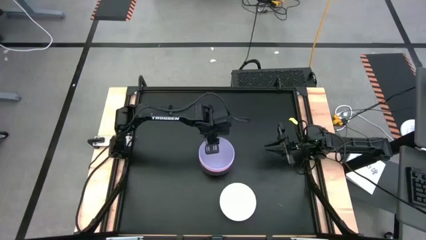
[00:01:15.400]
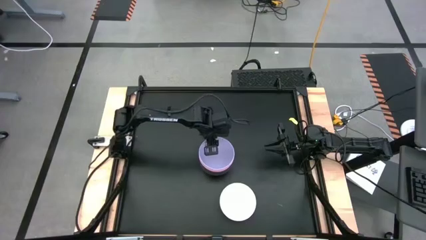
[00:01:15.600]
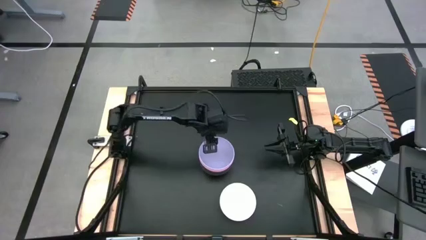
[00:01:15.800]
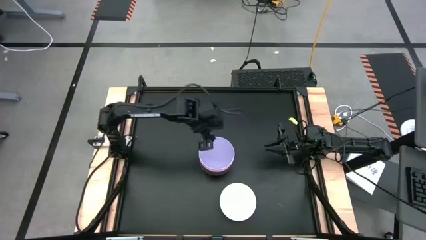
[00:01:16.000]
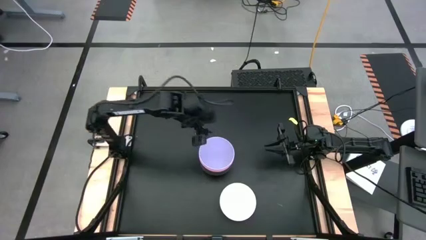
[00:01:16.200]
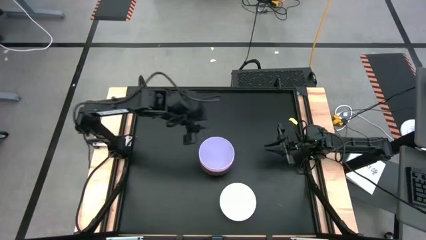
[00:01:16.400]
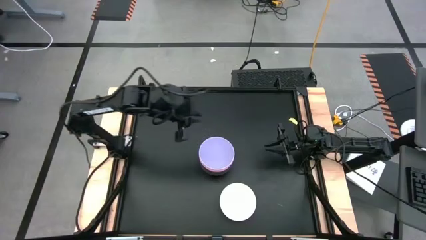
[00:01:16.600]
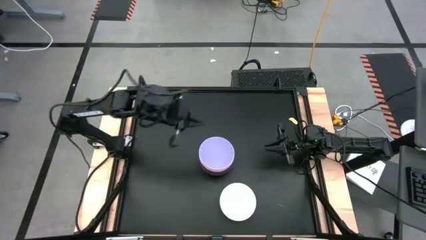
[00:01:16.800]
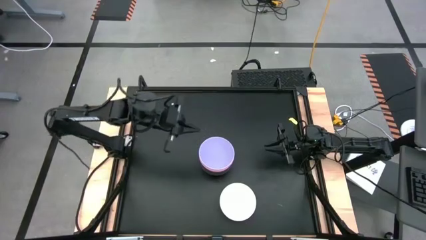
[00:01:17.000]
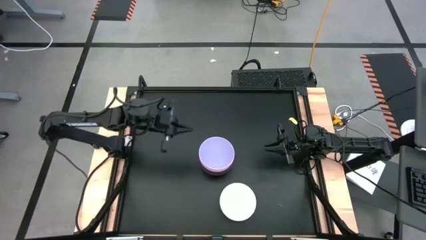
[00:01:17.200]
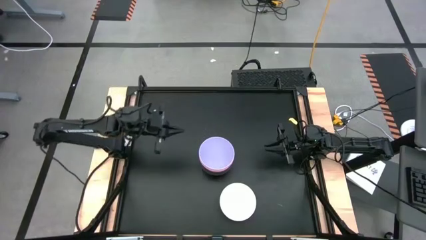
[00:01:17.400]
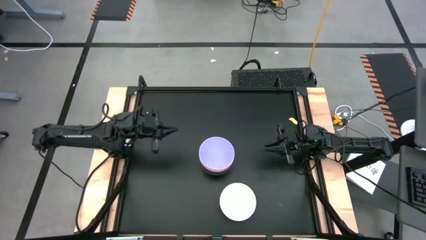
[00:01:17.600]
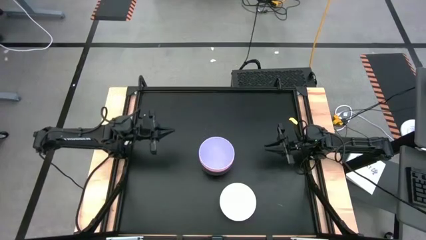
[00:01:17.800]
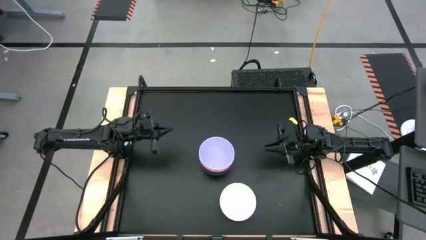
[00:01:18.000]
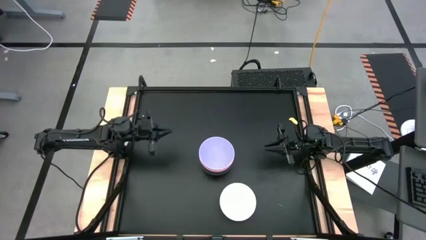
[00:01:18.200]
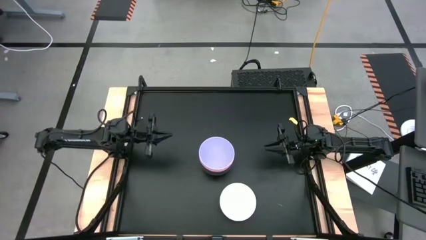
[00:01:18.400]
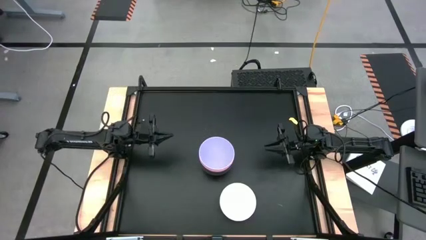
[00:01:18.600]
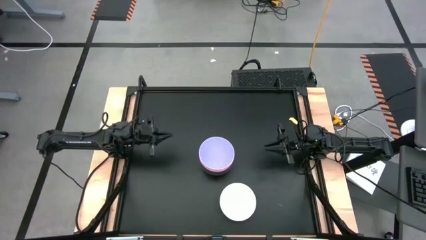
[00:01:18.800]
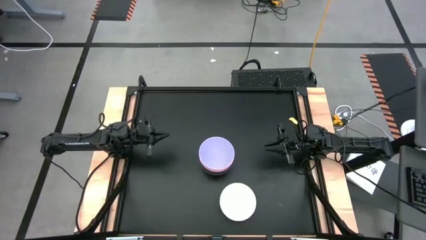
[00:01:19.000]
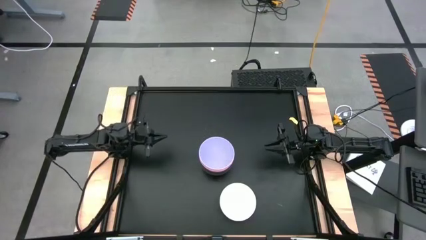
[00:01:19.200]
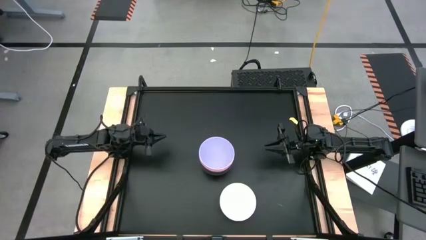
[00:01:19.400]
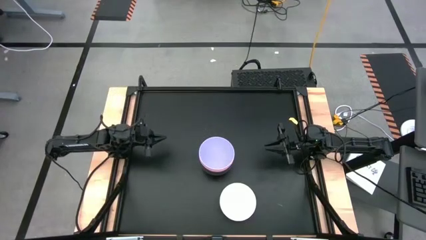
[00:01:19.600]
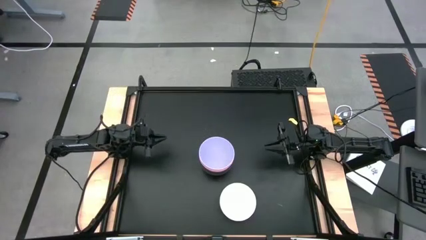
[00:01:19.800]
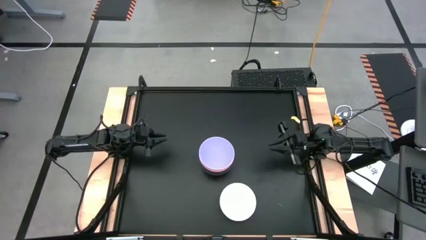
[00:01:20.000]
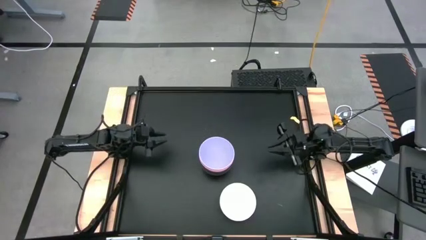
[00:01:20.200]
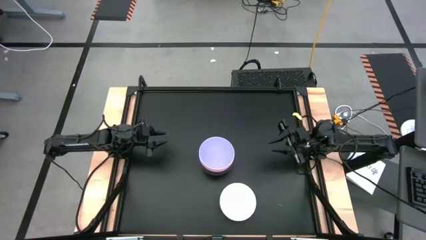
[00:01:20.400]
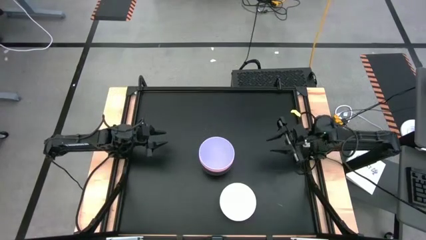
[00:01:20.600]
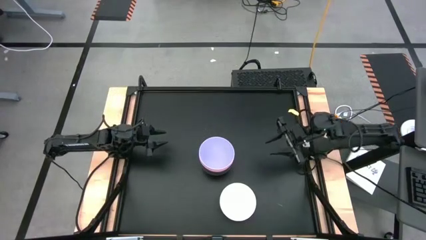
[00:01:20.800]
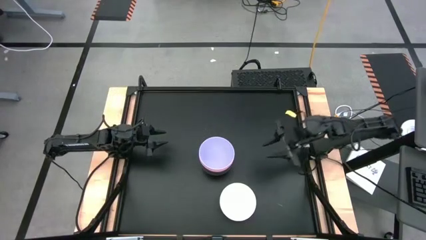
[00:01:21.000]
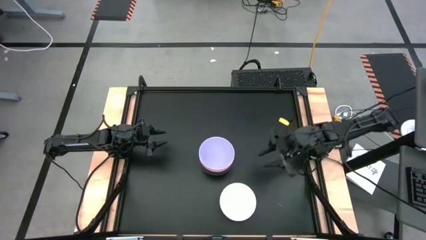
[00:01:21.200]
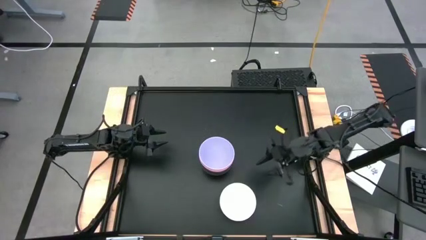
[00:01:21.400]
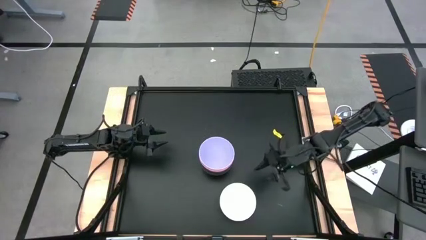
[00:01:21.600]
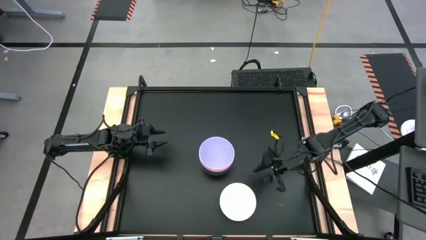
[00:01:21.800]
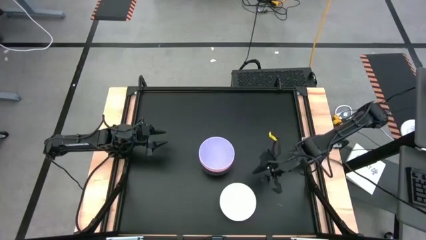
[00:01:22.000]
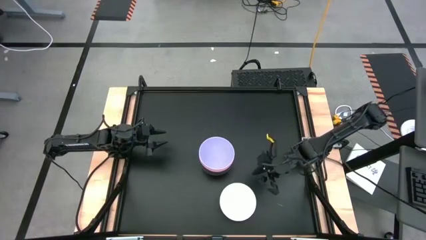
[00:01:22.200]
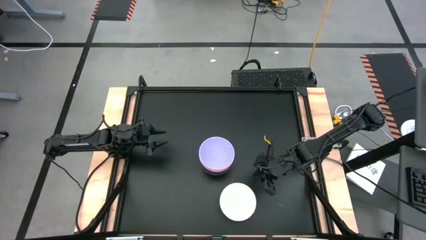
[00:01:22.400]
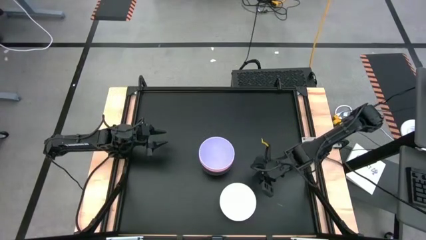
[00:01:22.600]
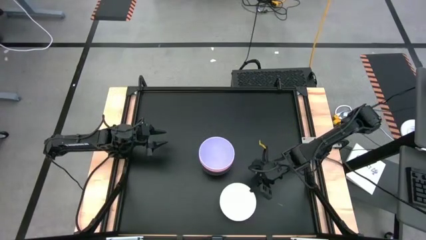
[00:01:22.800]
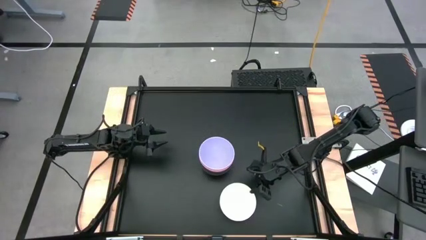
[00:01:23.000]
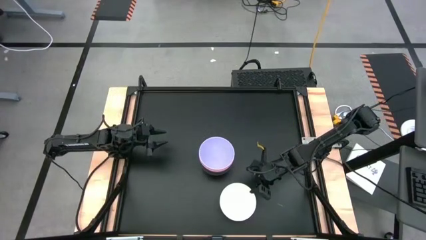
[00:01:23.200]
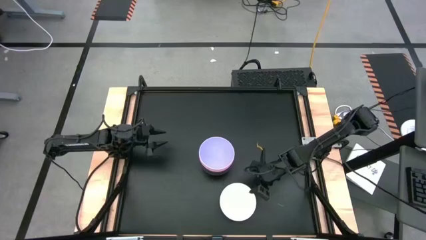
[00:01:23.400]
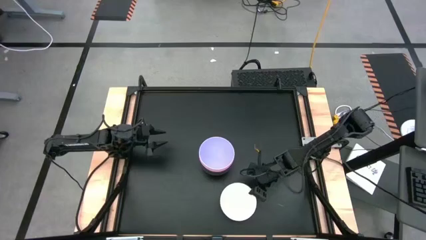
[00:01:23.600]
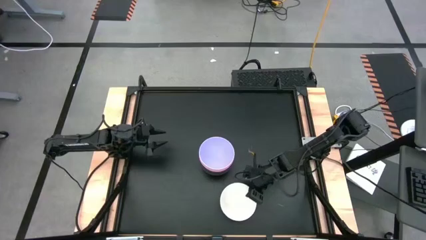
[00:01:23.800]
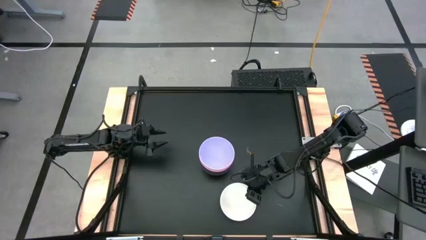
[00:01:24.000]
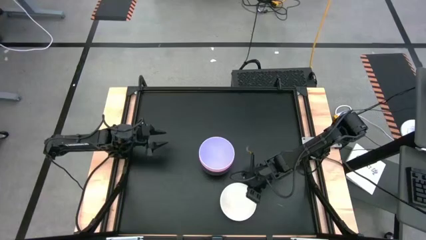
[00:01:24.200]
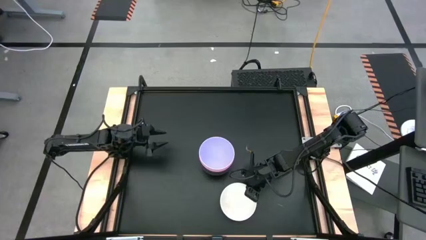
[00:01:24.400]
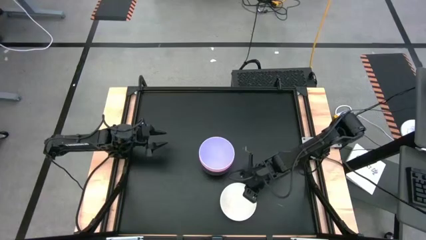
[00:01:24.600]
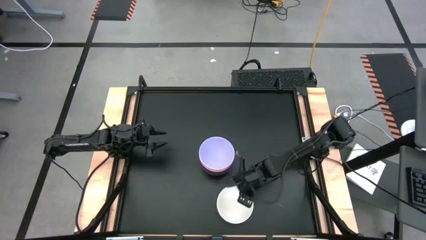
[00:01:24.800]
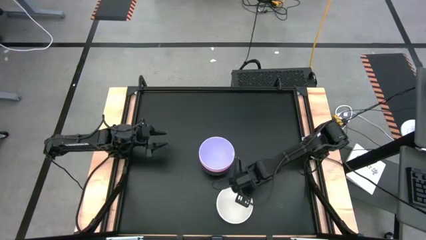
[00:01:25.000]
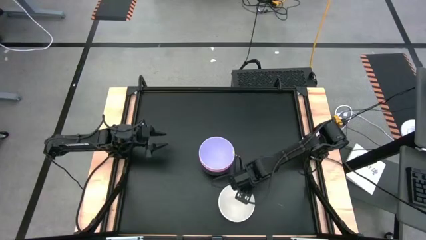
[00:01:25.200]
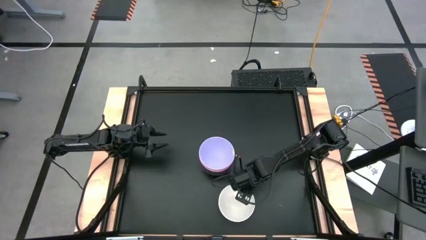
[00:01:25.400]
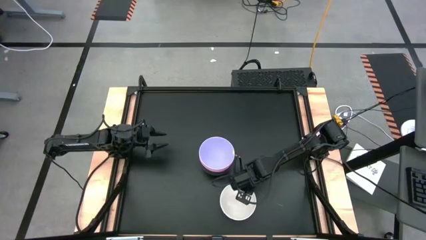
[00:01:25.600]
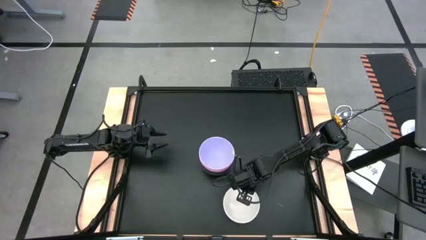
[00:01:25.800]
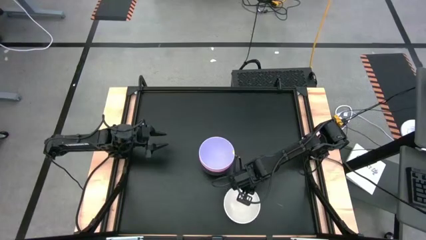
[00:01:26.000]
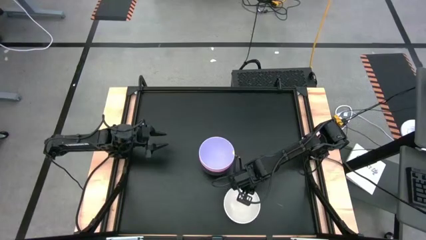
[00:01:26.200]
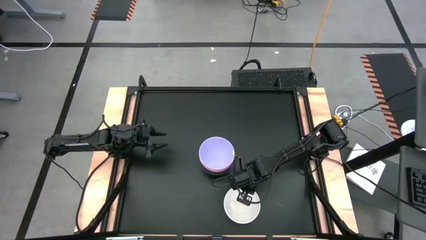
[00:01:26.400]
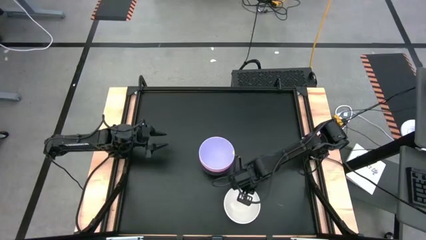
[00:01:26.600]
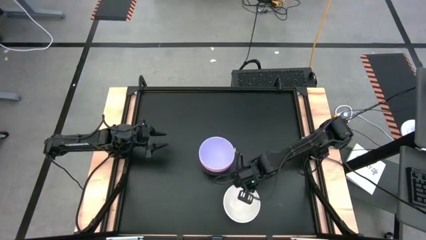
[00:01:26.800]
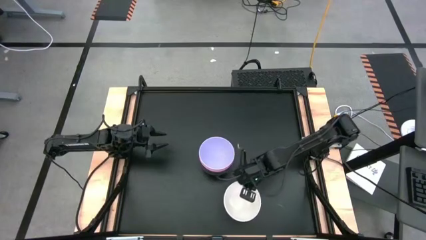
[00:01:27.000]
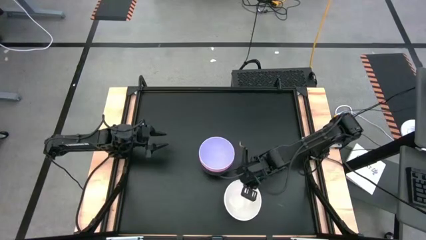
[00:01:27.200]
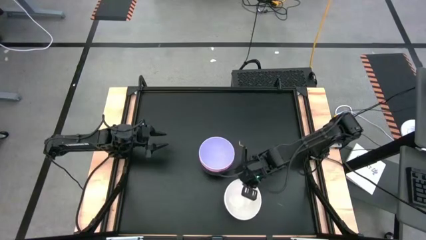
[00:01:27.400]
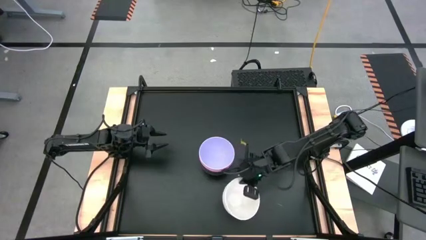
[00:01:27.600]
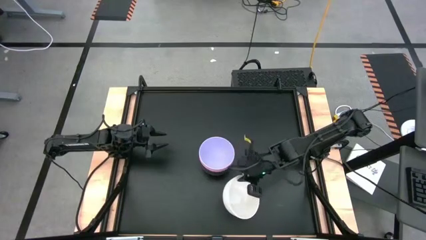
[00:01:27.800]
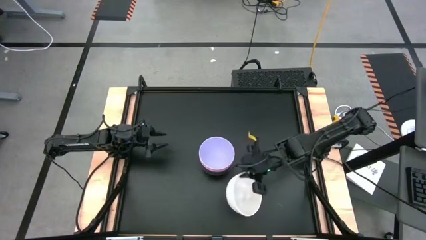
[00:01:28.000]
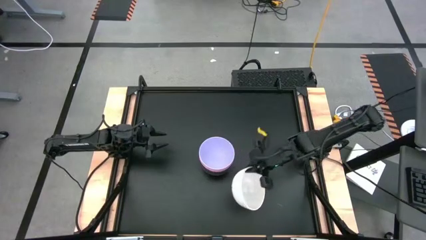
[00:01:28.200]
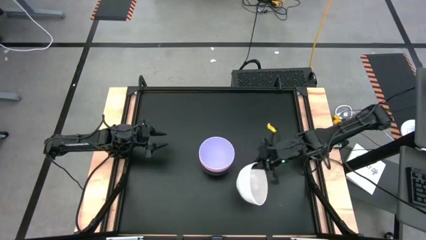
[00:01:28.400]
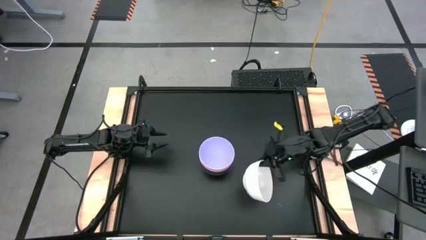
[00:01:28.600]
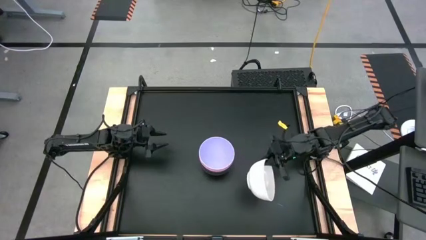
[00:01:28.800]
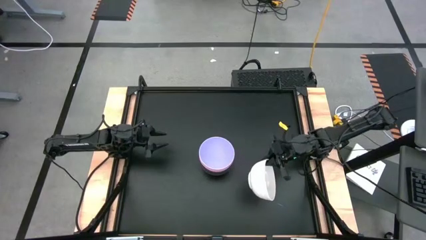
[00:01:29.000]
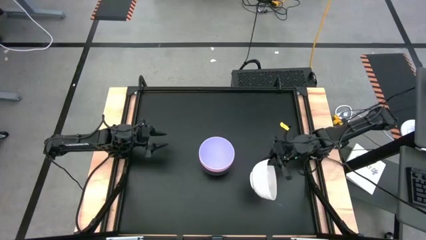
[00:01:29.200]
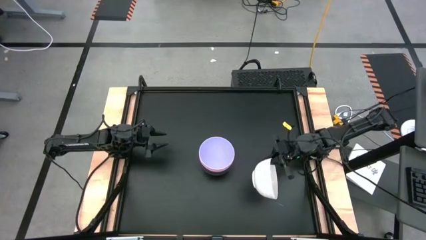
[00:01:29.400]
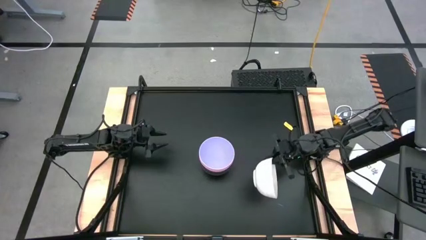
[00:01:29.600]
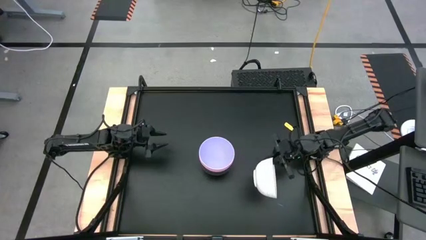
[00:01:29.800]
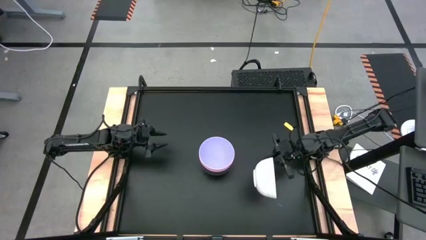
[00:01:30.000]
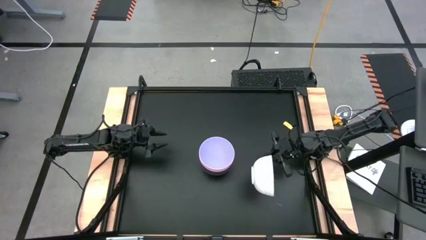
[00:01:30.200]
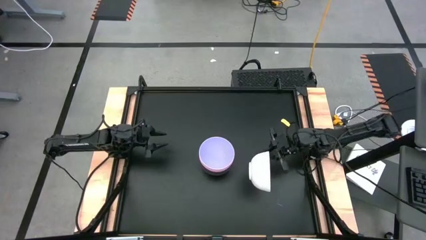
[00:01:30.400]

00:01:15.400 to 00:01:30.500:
Task: Nest bowls inside each other
Stack the white bowl on top of the purple bowl
